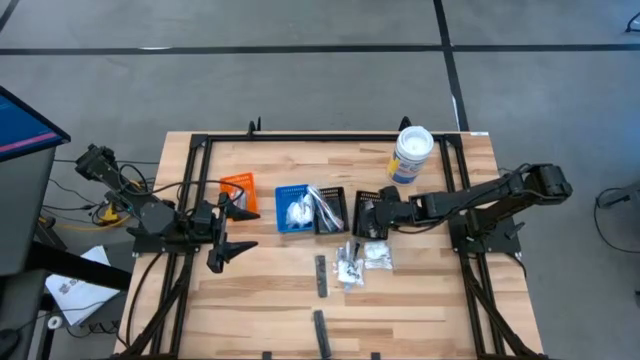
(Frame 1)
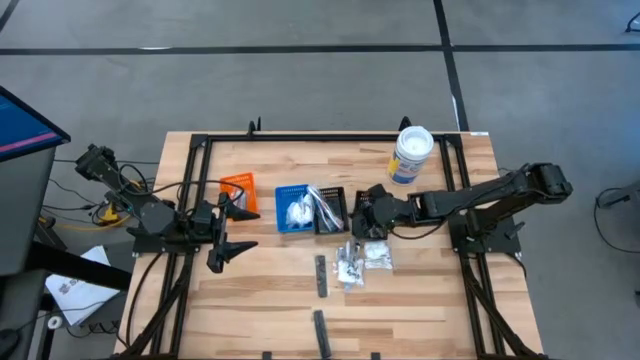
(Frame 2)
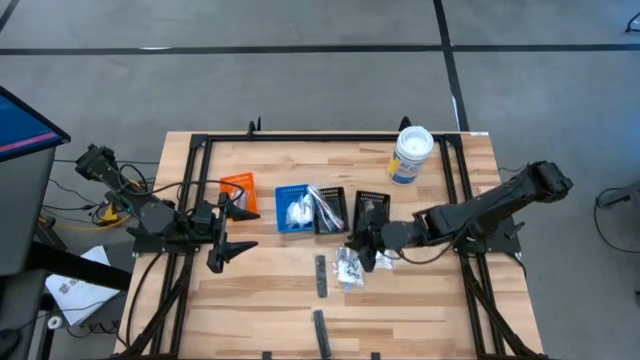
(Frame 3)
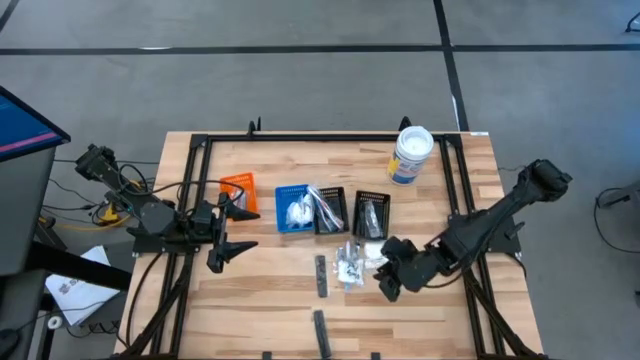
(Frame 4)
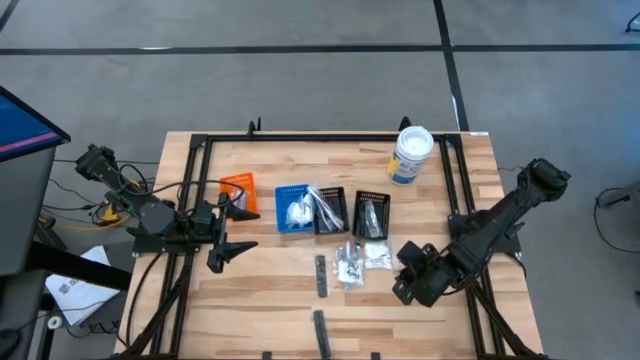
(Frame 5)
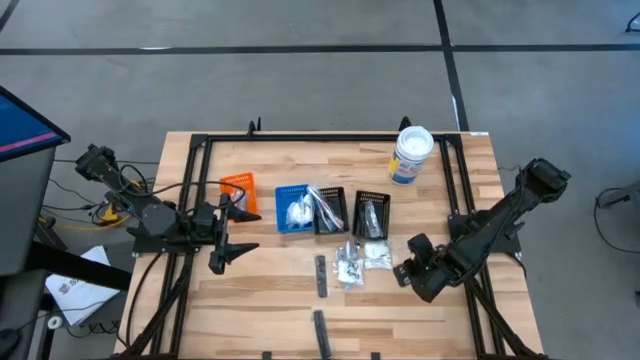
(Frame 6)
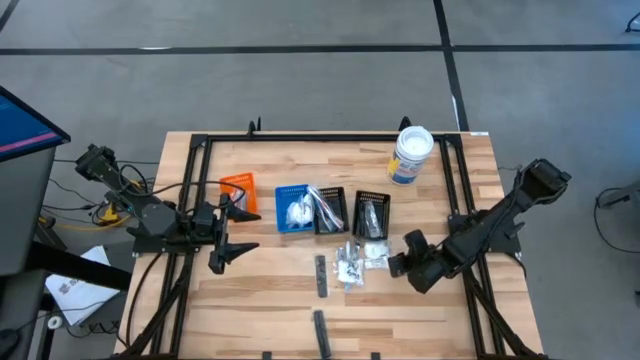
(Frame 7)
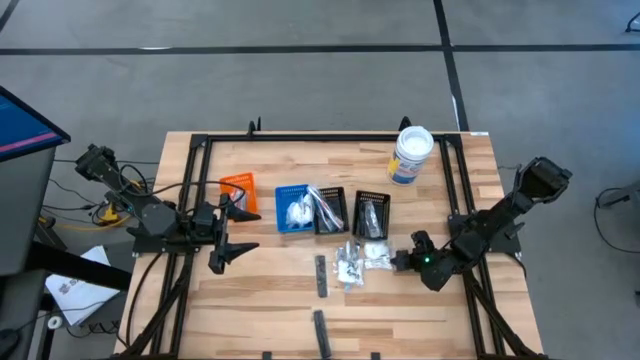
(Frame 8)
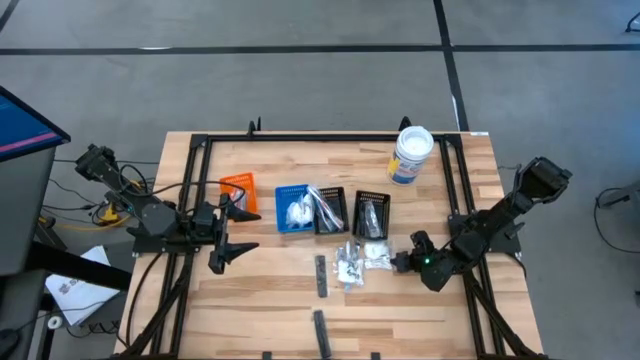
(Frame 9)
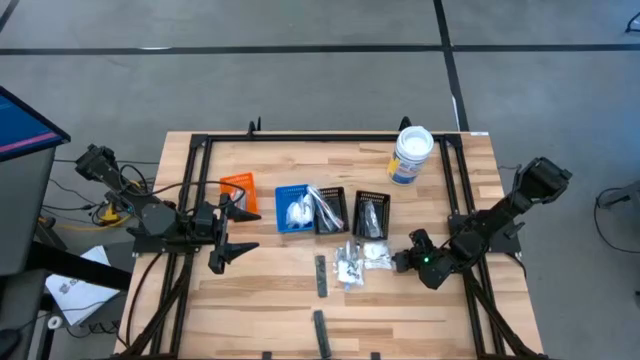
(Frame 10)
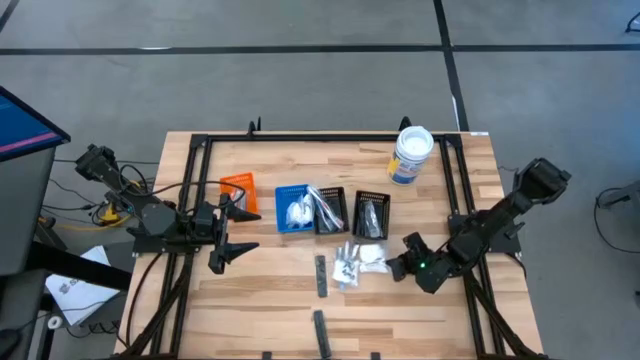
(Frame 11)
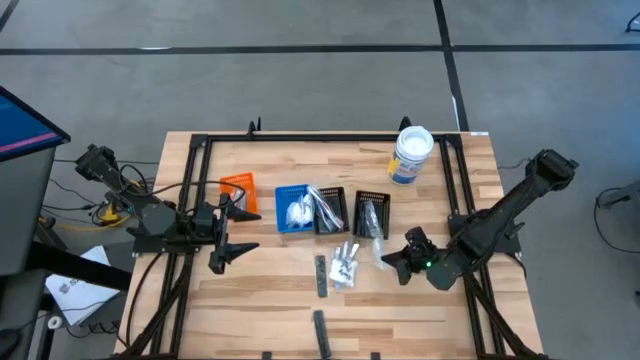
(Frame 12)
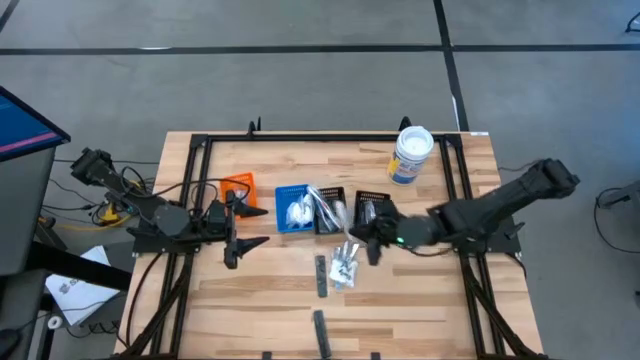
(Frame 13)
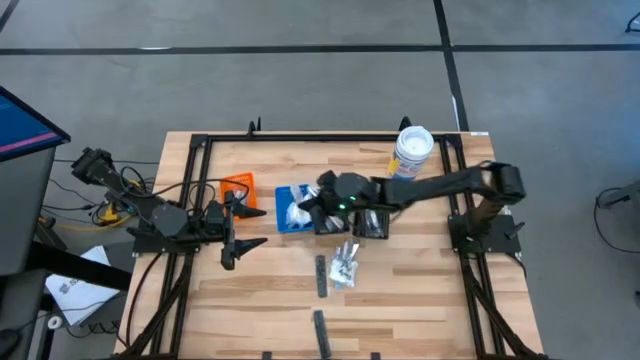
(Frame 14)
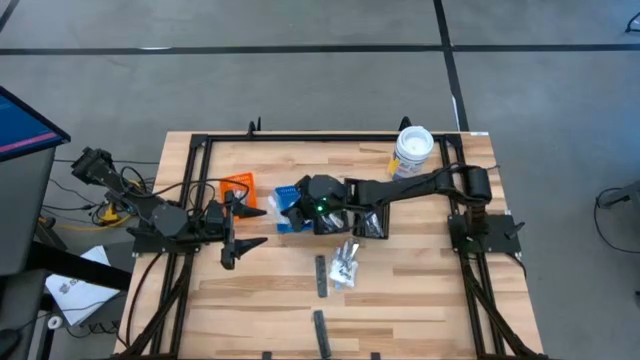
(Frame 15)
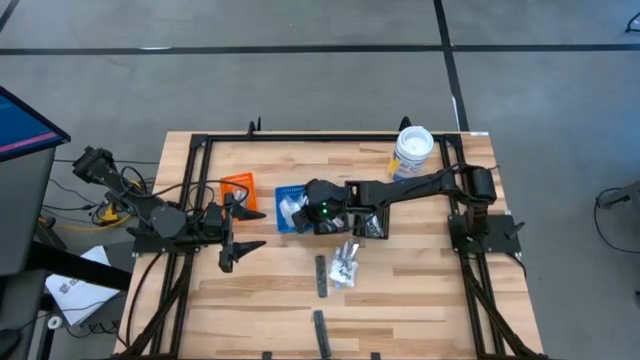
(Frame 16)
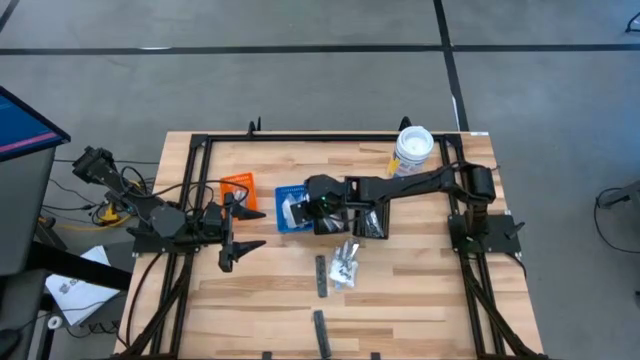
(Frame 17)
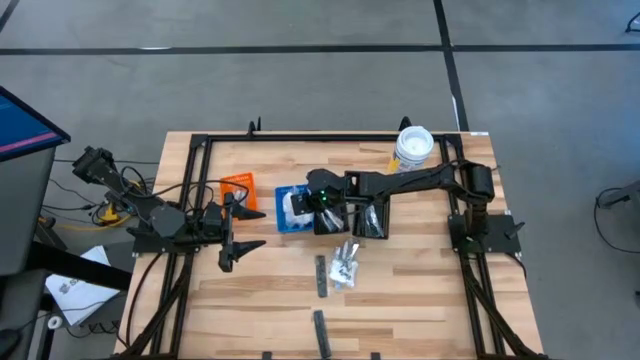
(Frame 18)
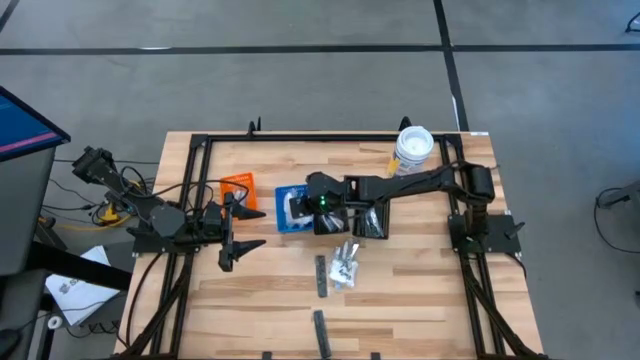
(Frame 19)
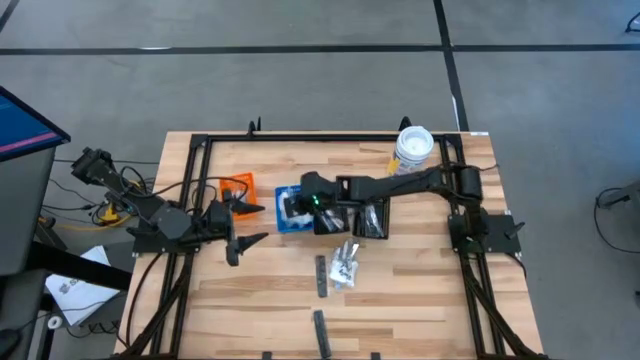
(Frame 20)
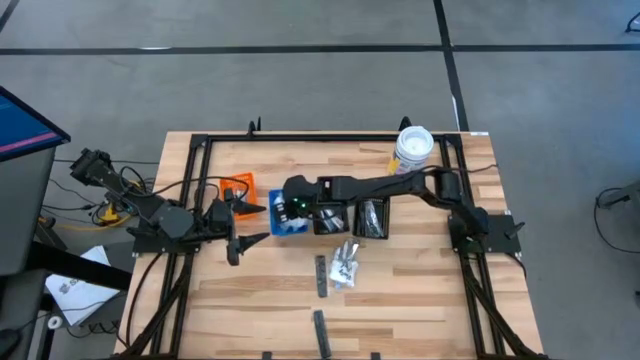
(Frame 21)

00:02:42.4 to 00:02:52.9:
Task: Pick & Place Travel size toiletries
Put the pack of cotton buds into the blue bin

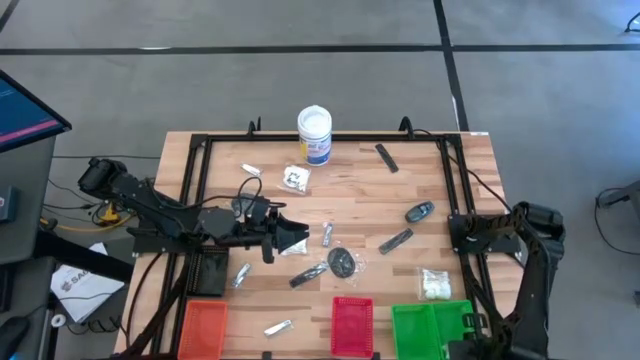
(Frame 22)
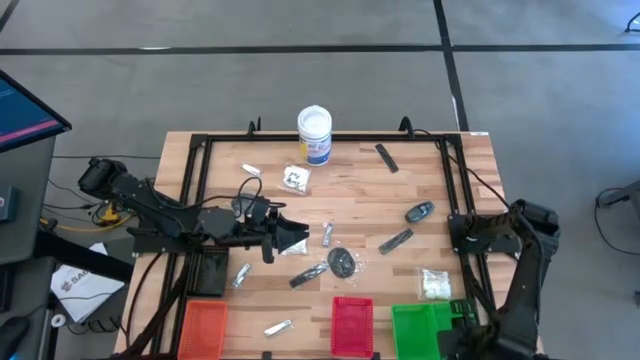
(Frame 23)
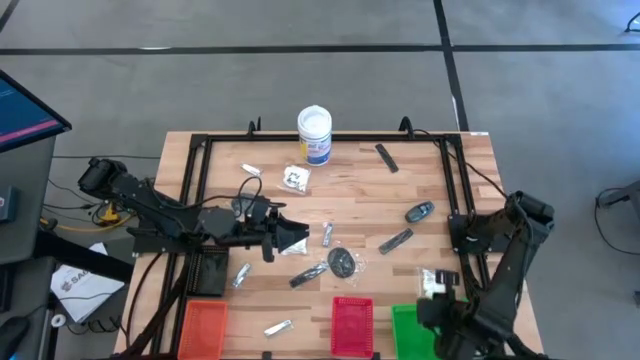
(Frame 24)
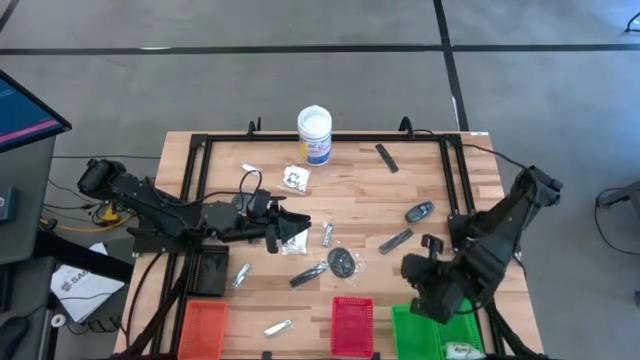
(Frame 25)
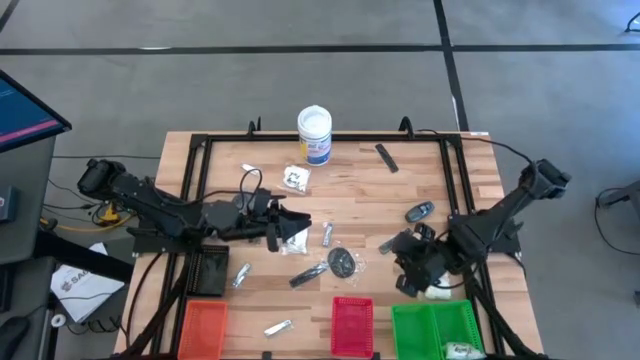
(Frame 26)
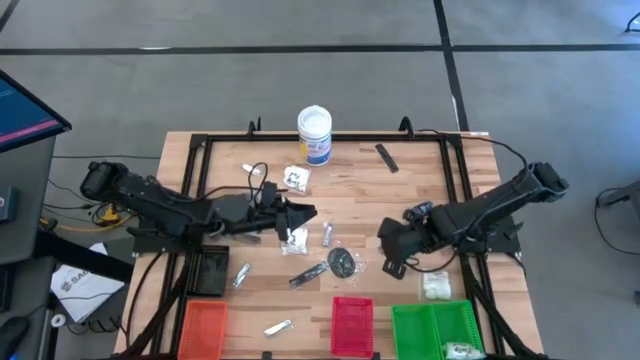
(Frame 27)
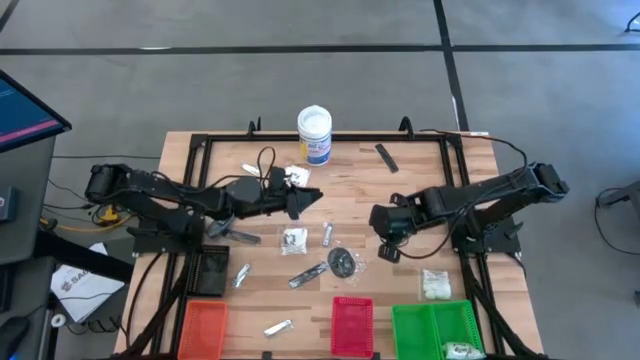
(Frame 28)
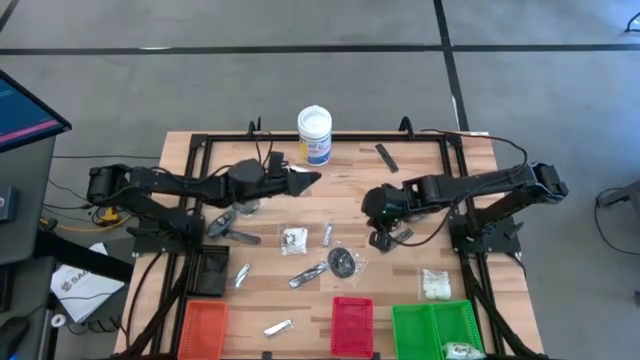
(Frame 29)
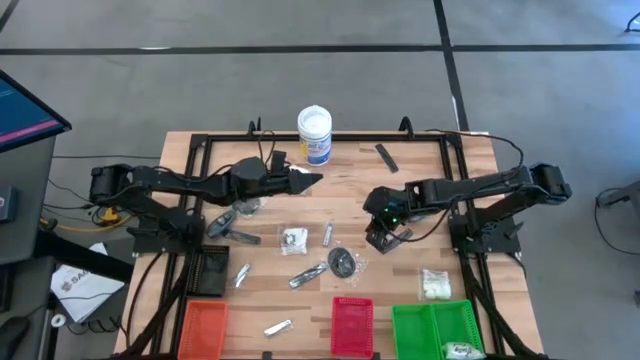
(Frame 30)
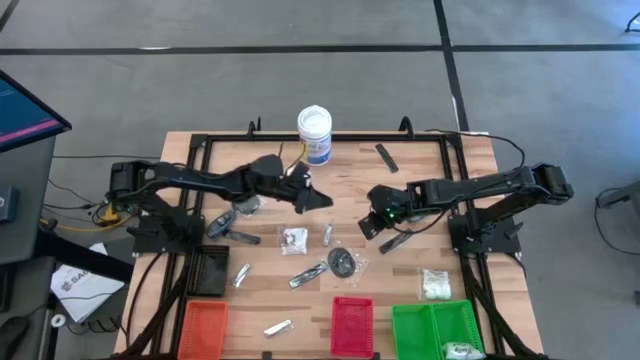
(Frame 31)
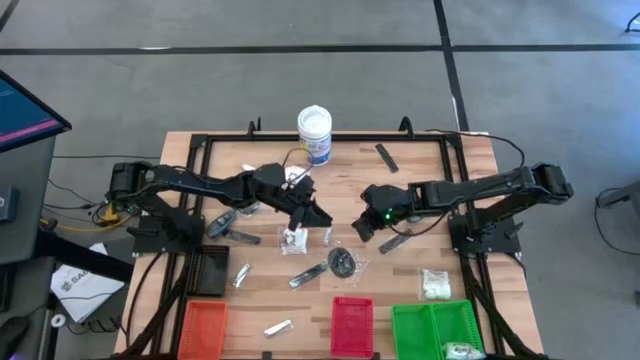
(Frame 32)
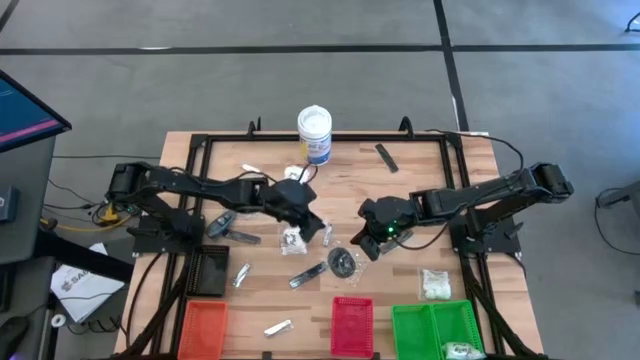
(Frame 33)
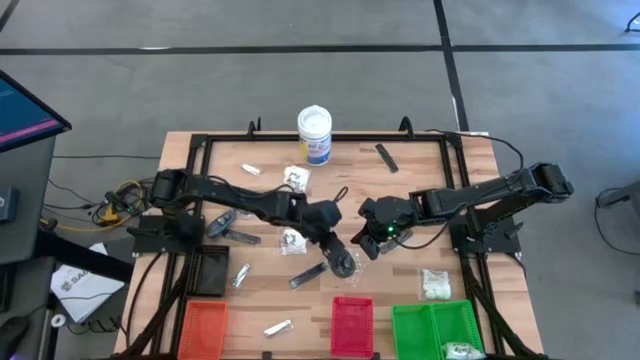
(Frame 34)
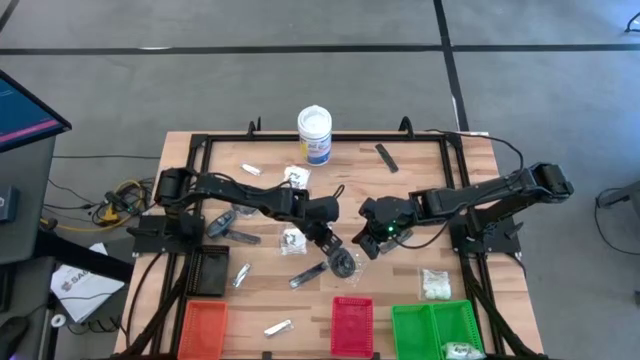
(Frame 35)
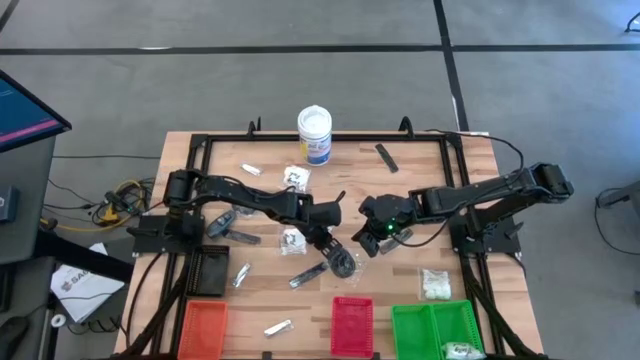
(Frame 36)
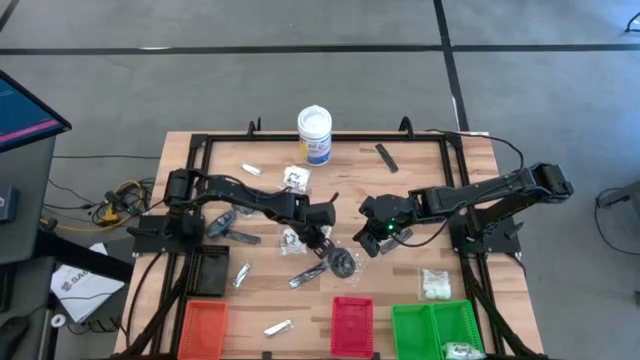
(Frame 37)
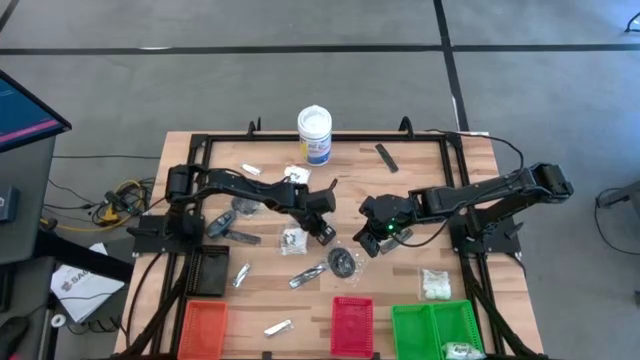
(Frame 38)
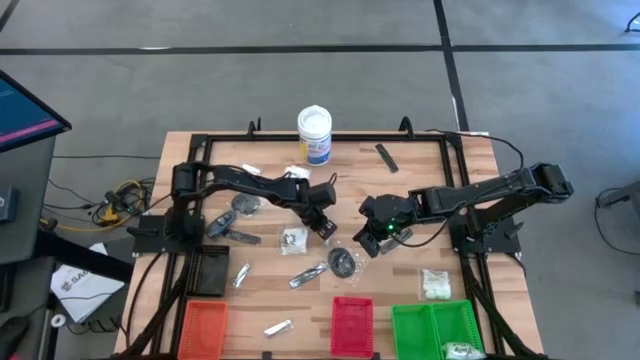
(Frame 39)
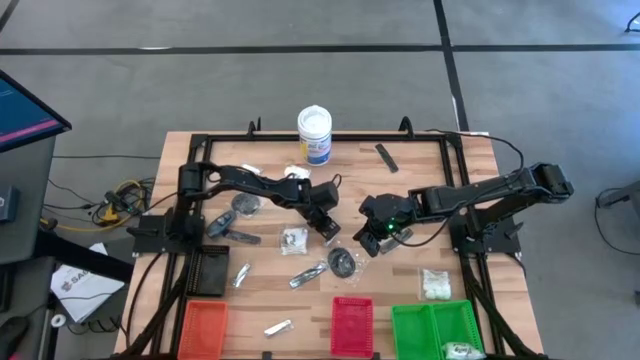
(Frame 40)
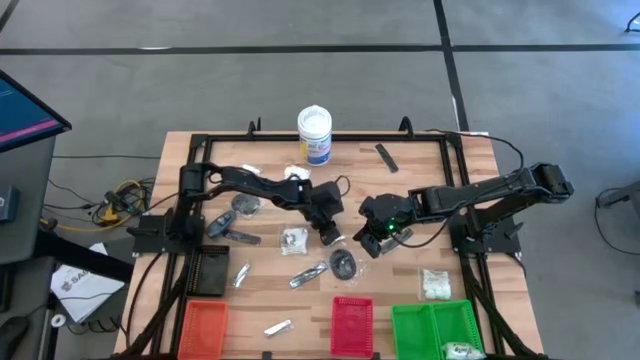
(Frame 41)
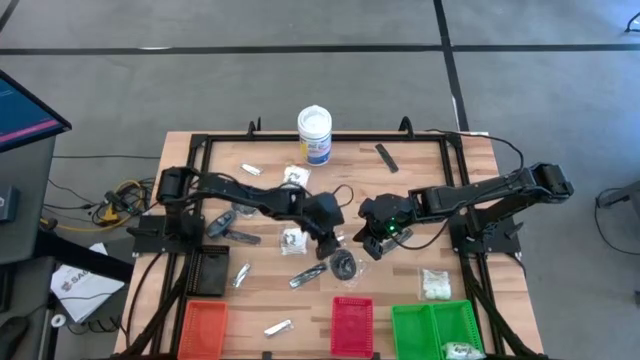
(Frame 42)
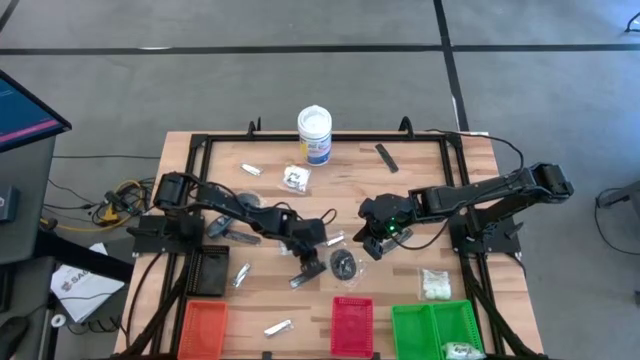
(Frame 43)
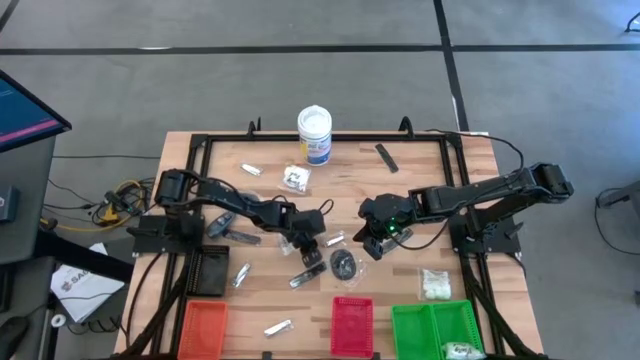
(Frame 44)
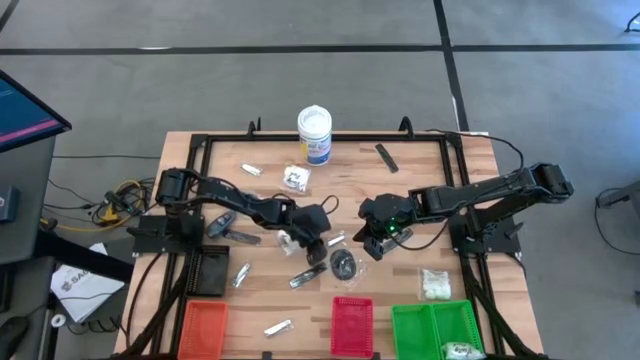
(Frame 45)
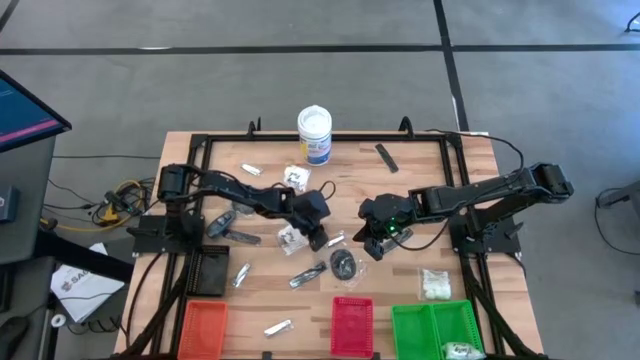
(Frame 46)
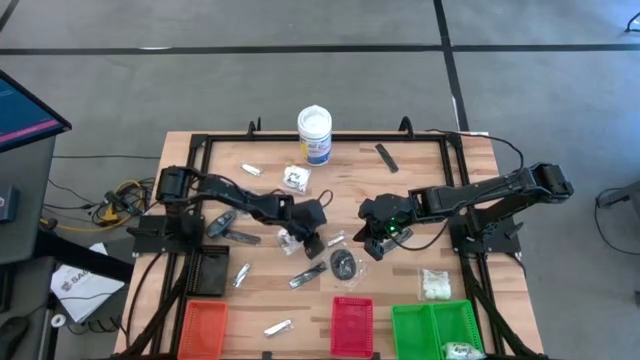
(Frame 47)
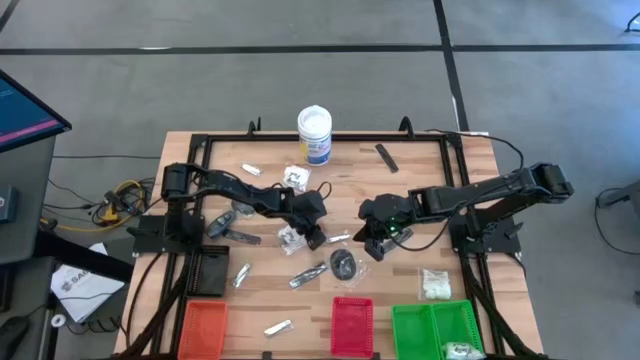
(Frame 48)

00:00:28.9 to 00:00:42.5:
Task: Pick & Place Travel size toiletries
Put the silver nail cutter into the left green bin
